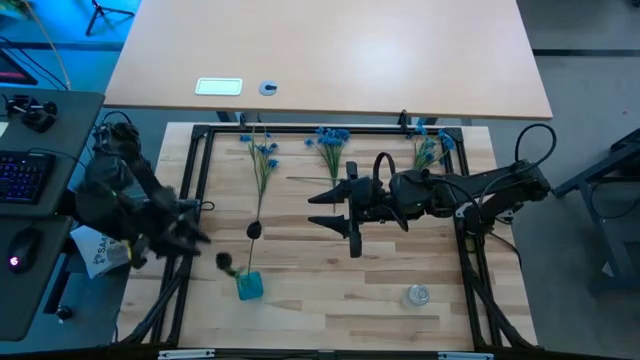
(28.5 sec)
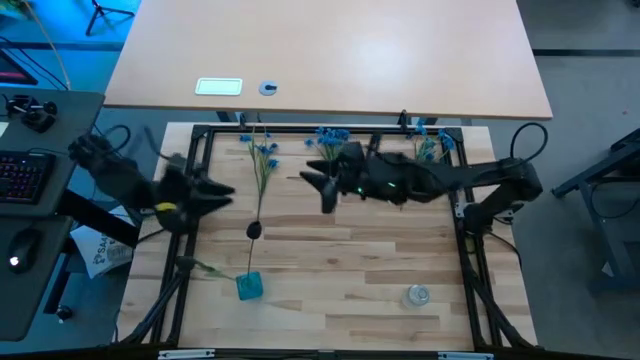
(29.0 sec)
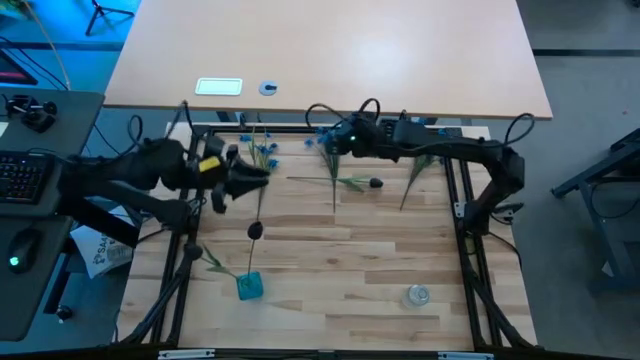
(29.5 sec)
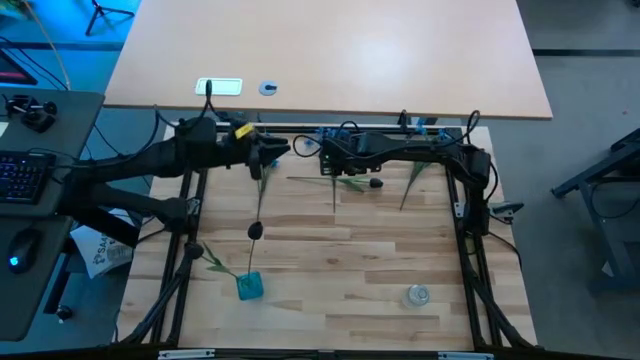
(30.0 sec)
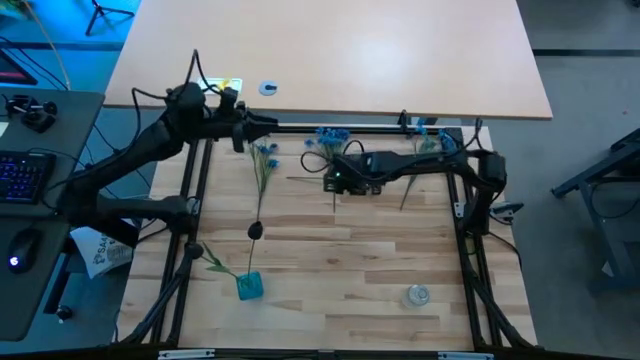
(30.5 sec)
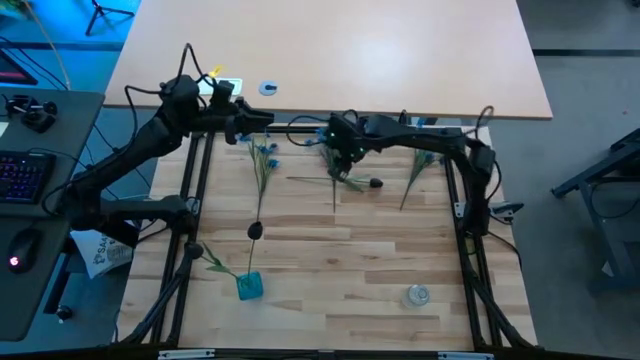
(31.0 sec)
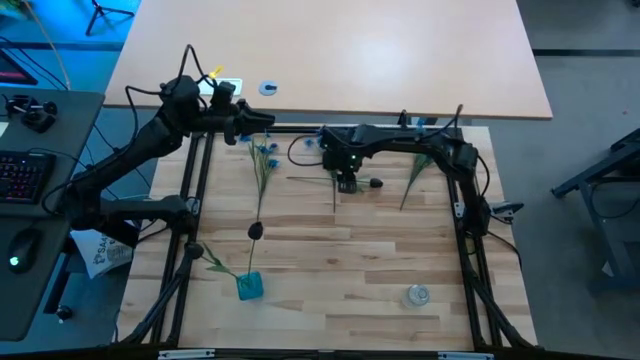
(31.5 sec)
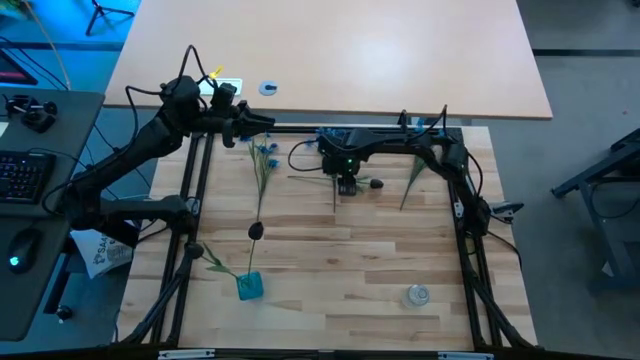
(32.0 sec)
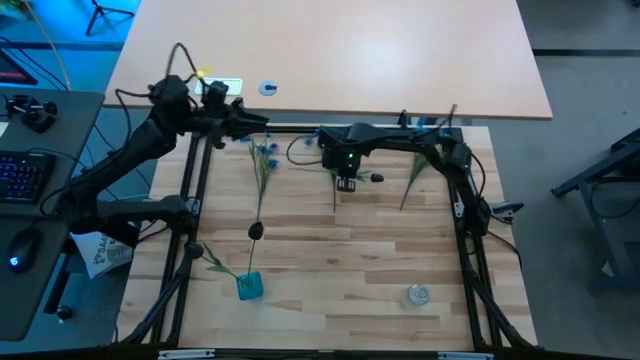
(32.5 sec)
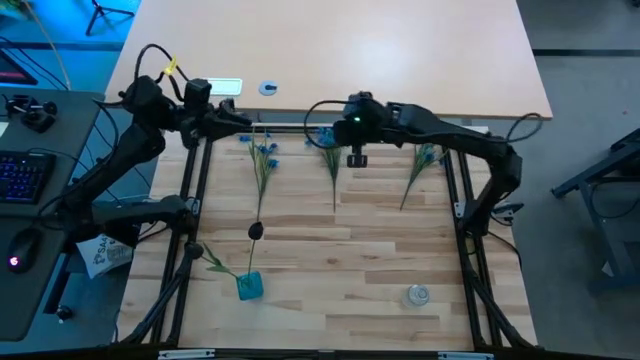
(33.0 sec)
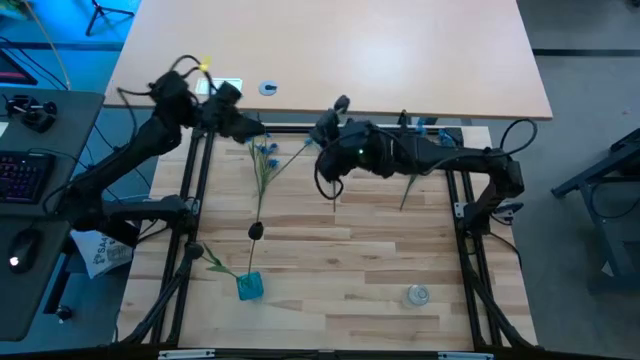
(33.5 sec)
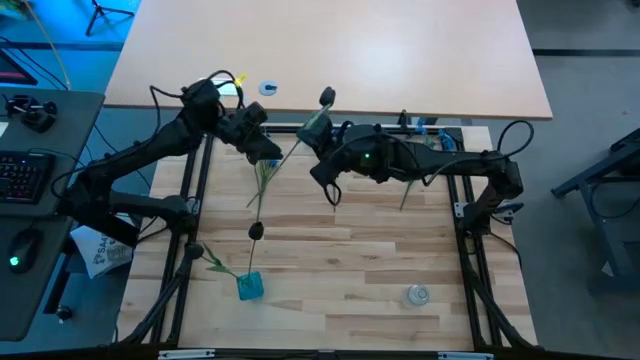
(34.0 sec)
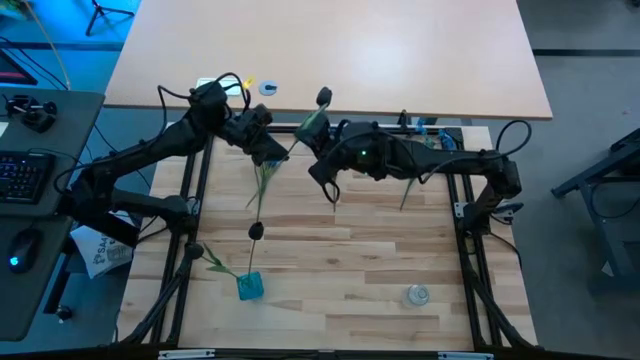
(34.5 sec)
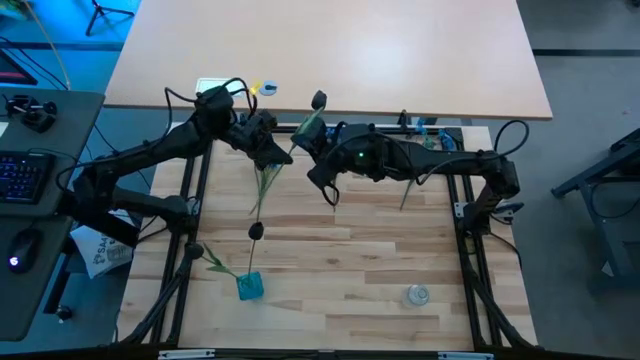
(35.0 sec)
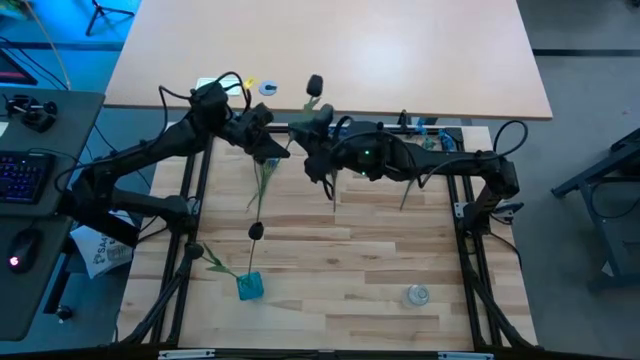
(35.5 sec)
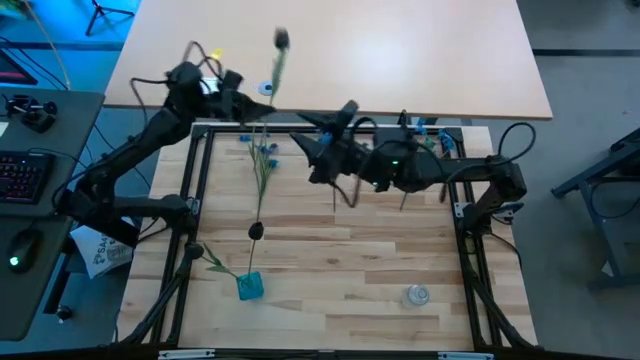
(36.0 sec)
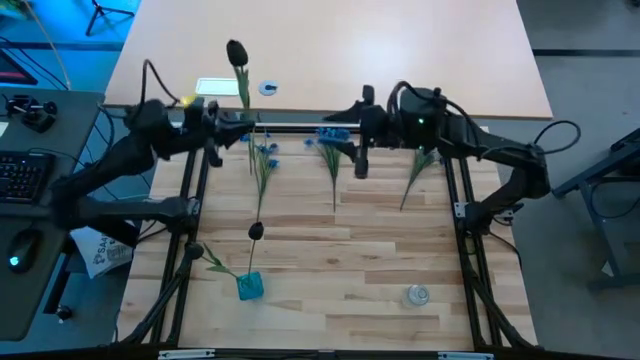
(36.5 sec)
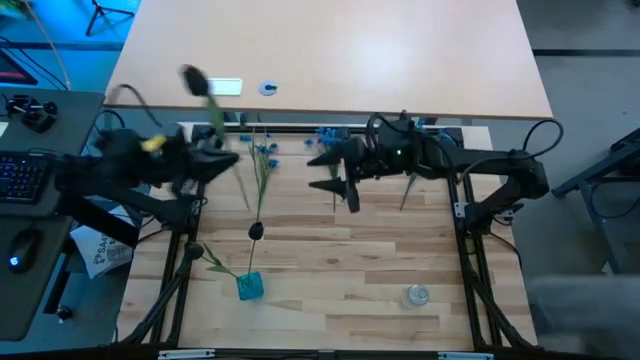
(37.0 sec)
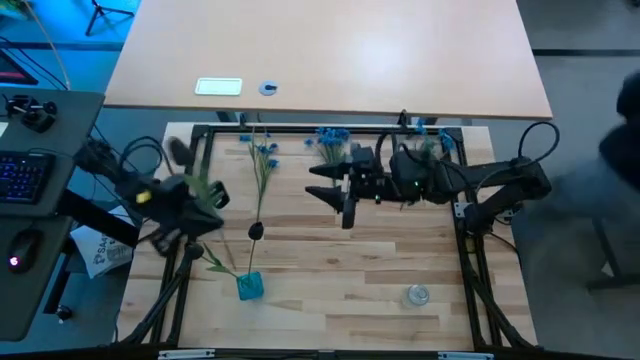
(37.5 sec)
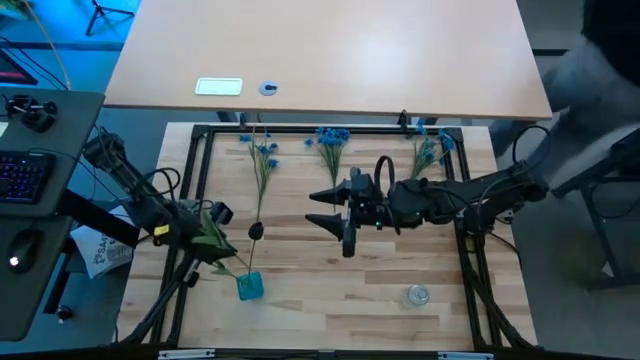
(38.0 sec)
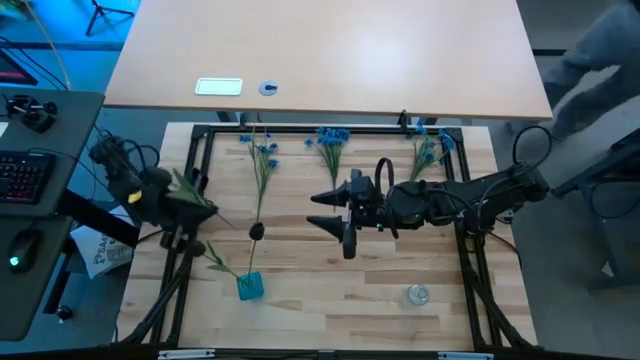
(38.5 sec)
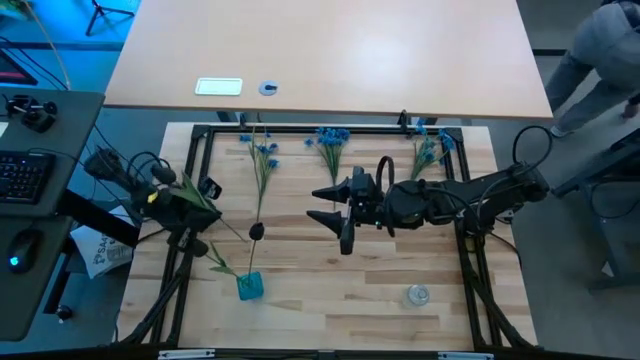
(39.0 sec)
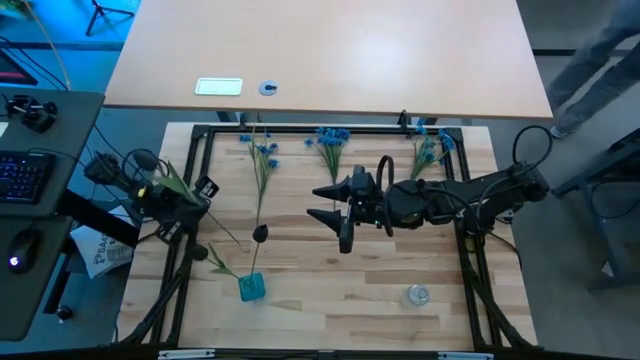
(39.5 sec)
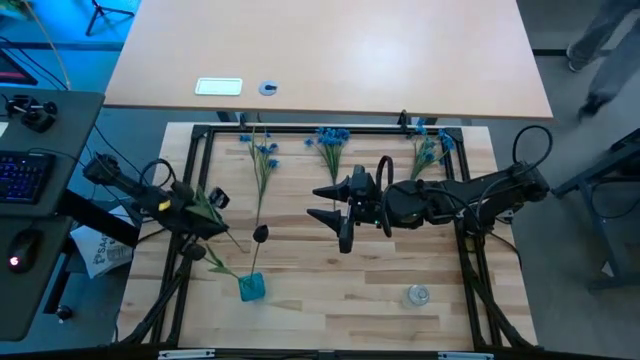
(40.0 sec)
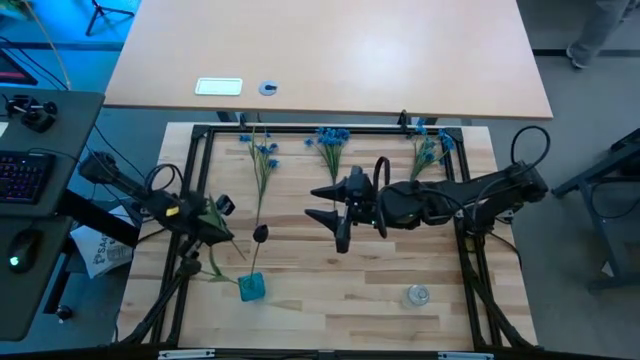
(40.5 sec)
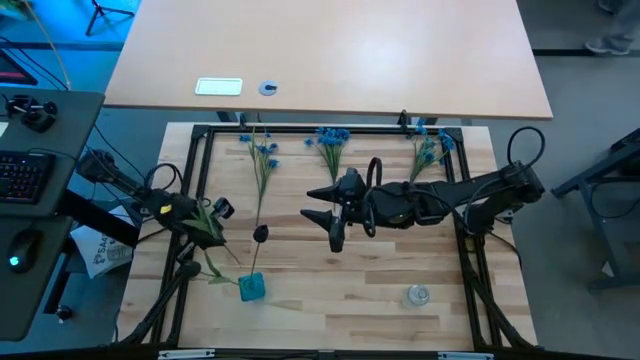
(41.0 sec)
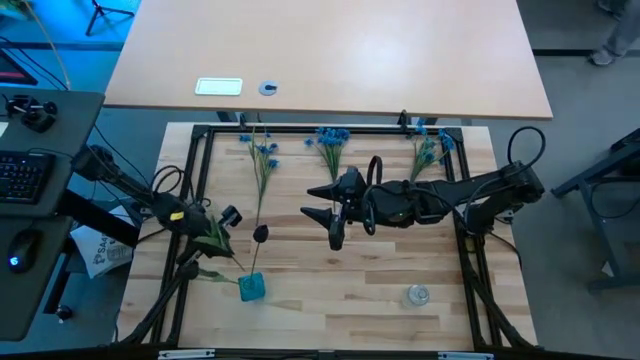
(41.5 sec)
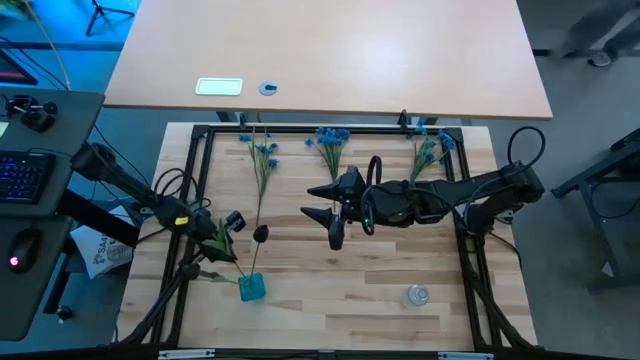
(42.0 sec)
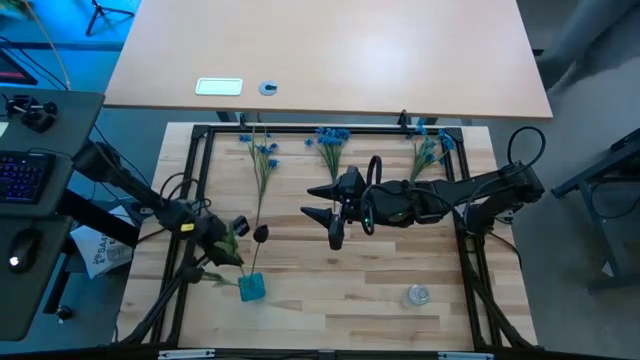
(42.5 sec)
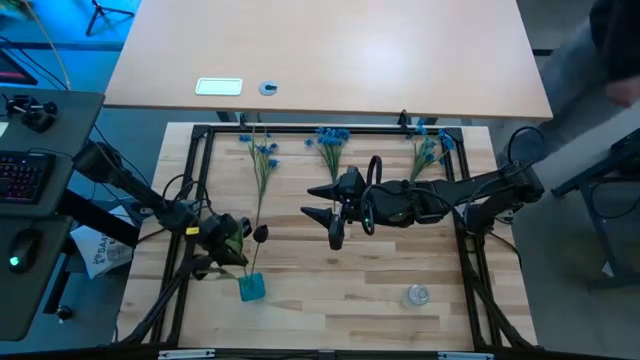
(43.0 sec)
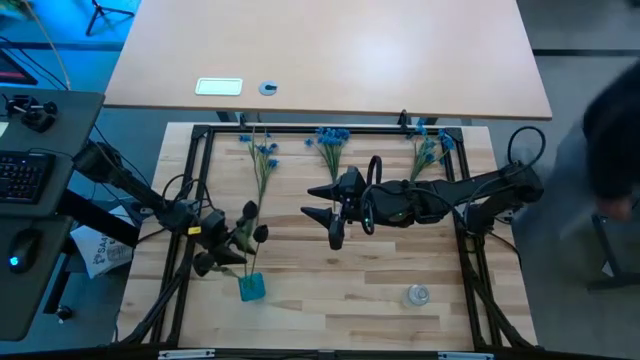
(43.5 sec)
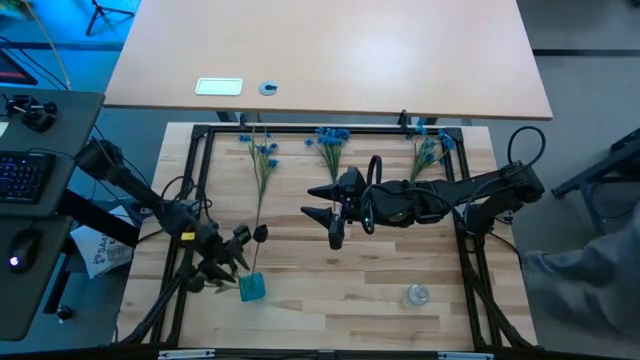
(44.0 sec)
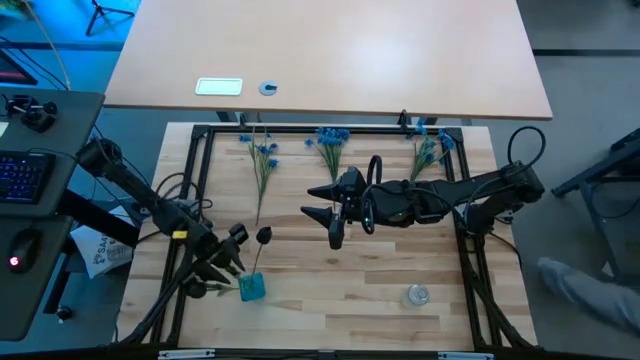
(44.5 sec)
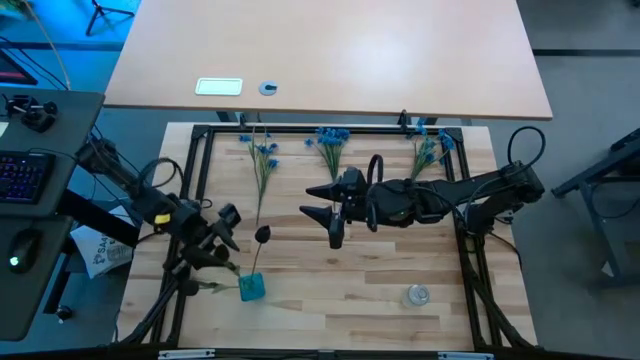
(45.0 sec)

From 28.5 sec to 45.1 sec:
Task: Sort flowers into vase by color
Put the black flower into the blue vase

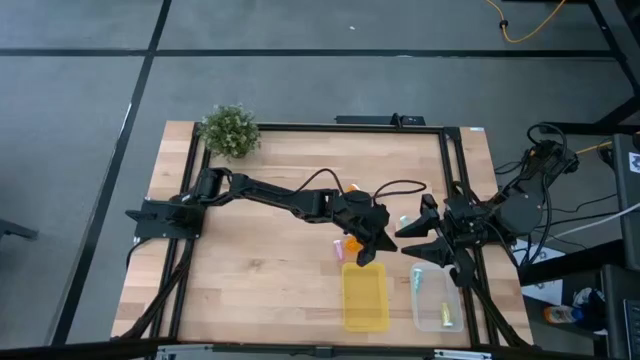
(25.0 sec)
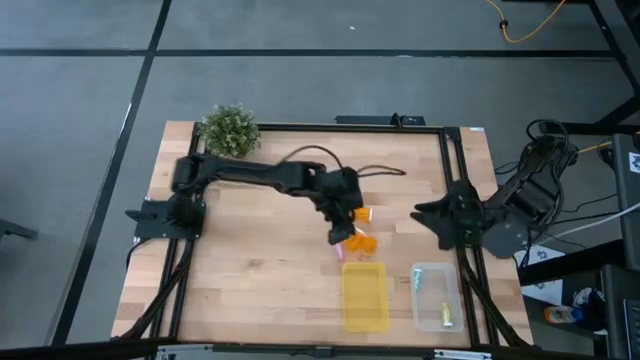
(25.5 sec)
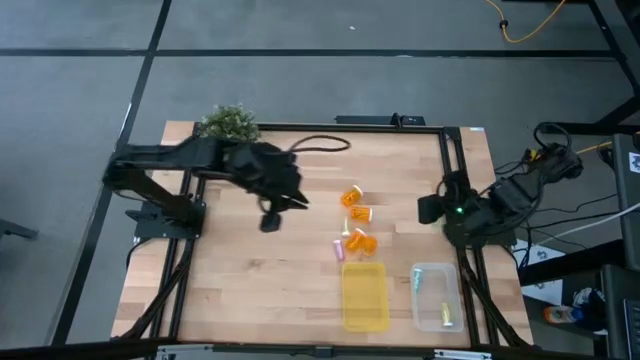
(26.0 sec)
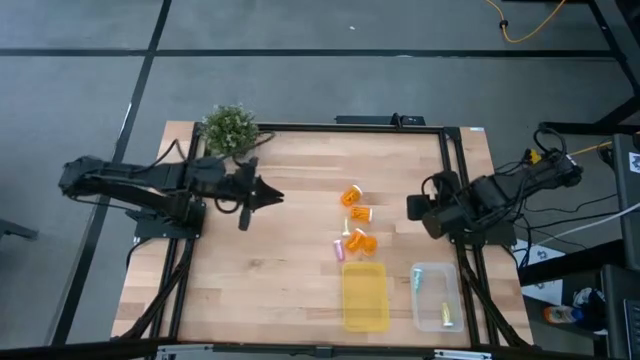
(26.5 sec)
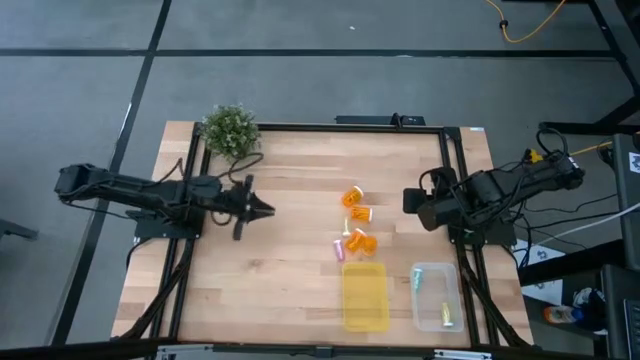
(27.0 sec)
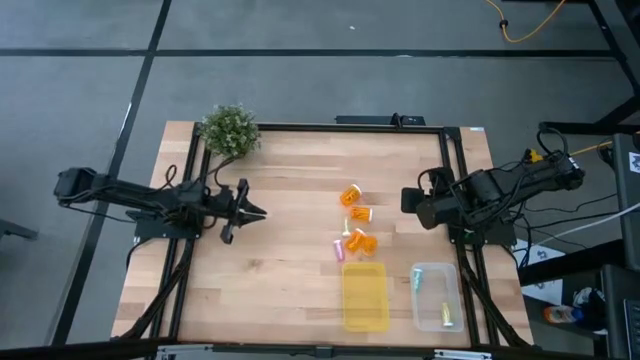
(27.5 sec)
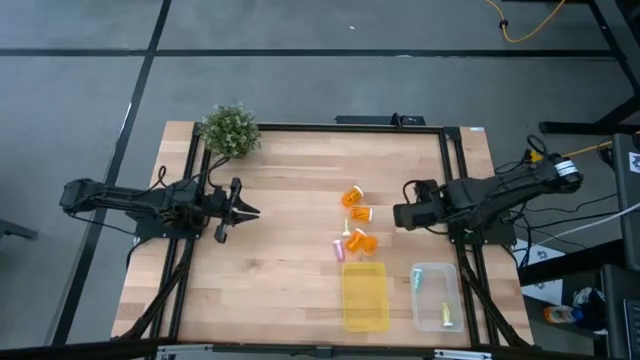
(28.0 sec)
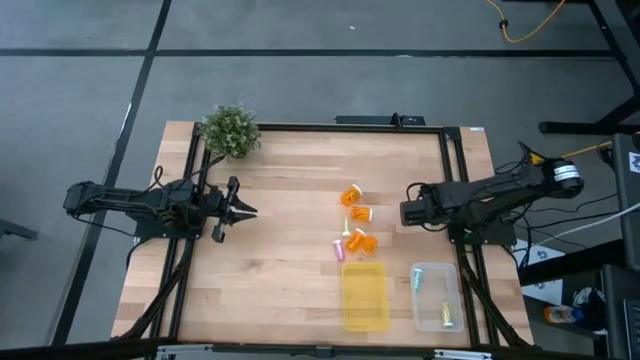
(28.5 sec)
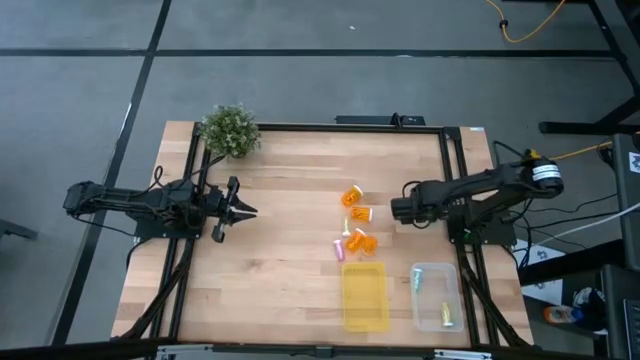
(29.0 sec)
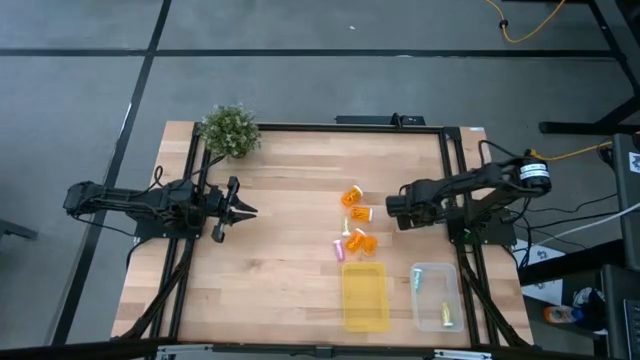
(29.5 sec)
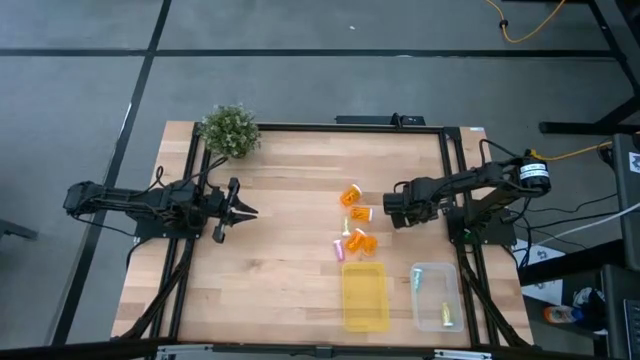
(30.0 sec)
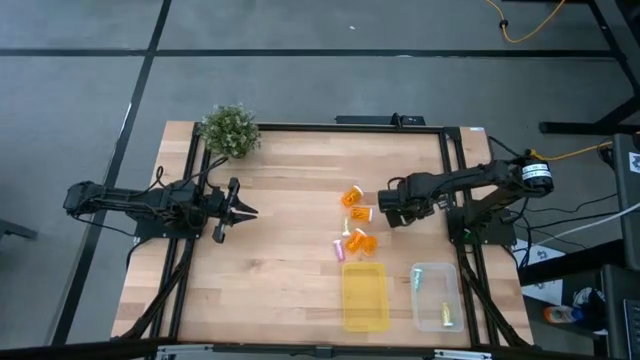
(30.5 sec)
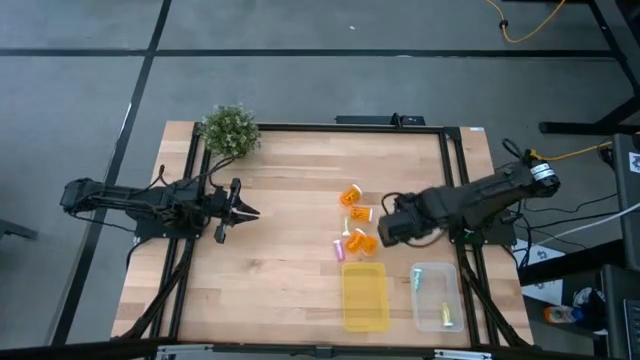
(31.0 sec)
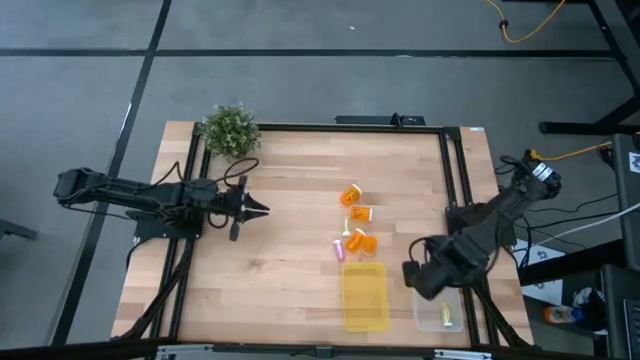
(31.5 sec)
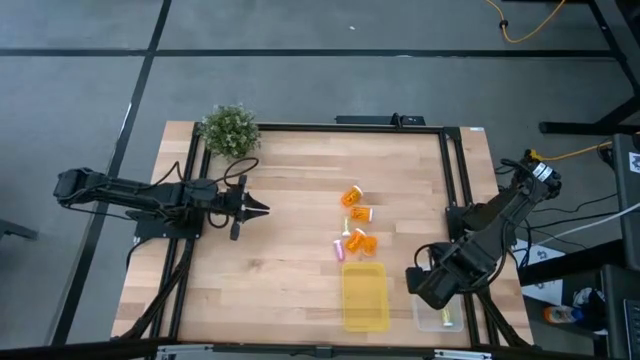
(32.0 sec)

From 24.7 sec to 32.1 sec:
Task: Pick and place medicine bottles into bin by pill shape (circle, oval)
Put the blue tablet bottle into the transparent bin
